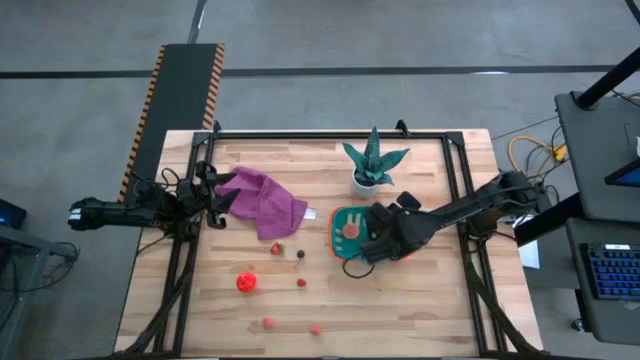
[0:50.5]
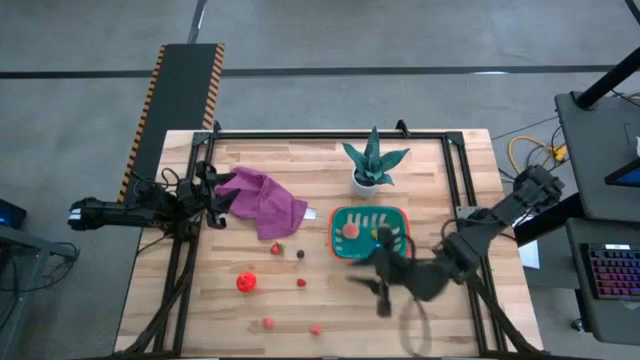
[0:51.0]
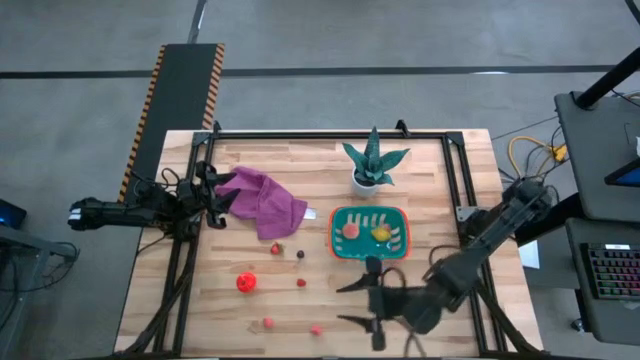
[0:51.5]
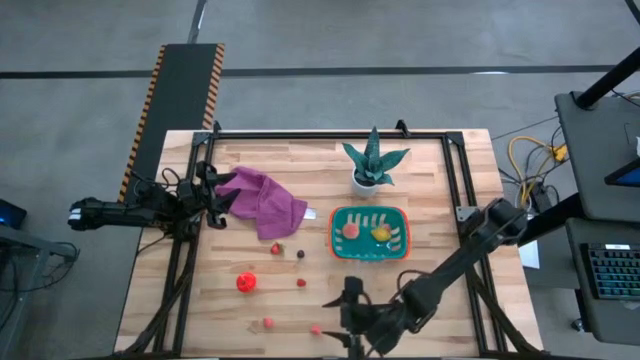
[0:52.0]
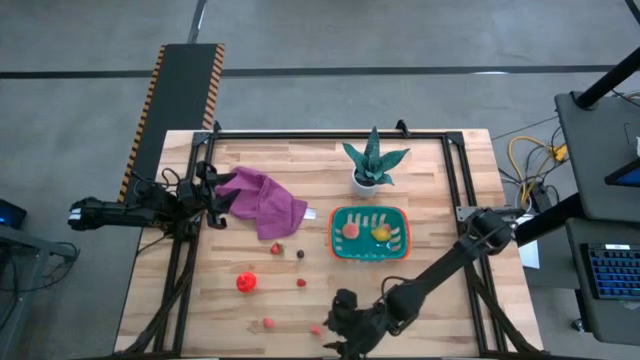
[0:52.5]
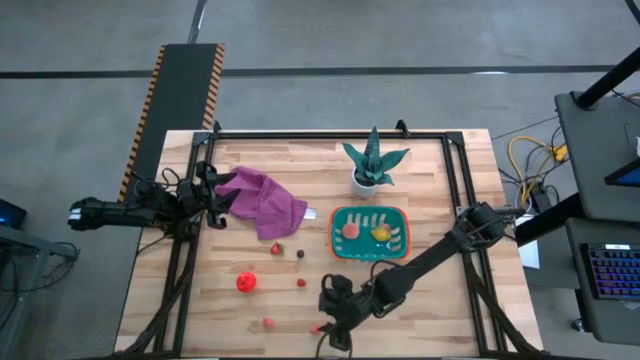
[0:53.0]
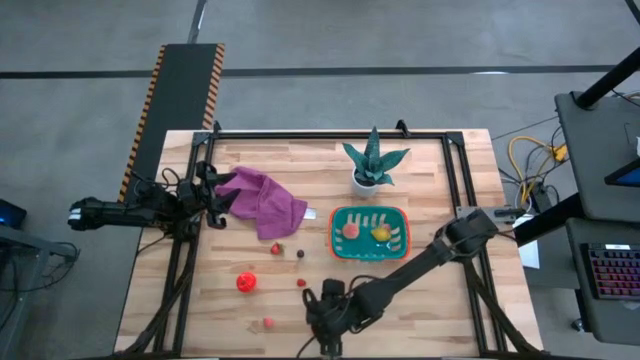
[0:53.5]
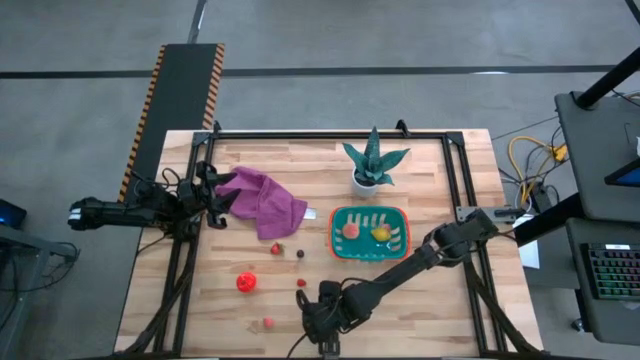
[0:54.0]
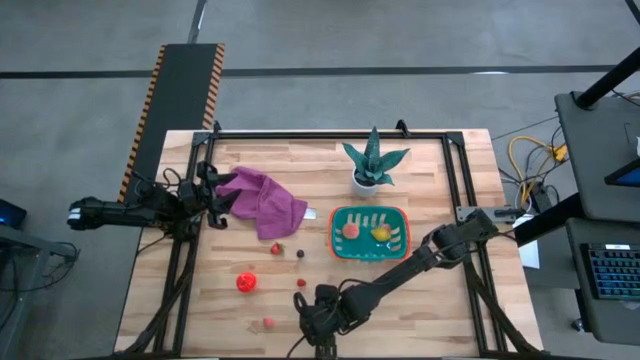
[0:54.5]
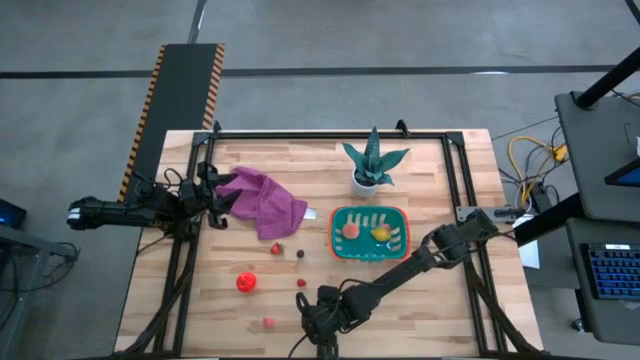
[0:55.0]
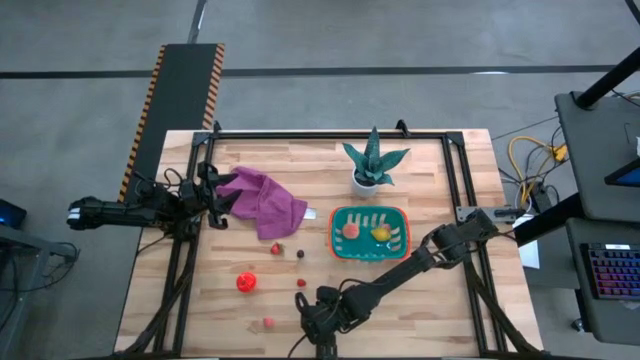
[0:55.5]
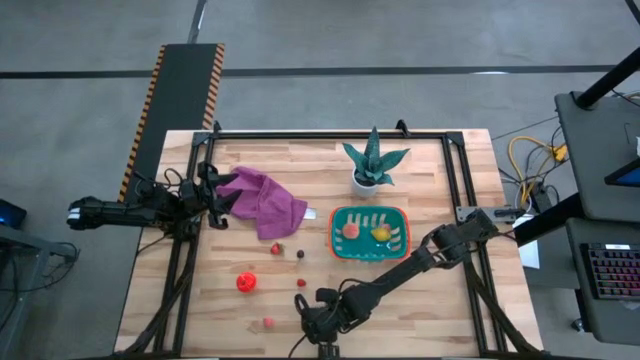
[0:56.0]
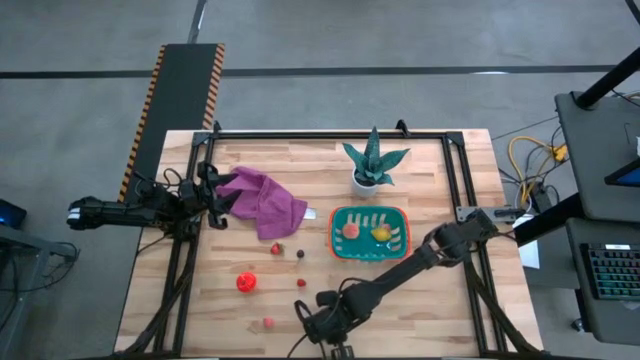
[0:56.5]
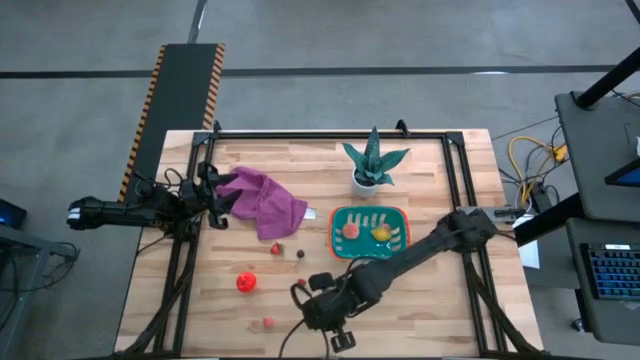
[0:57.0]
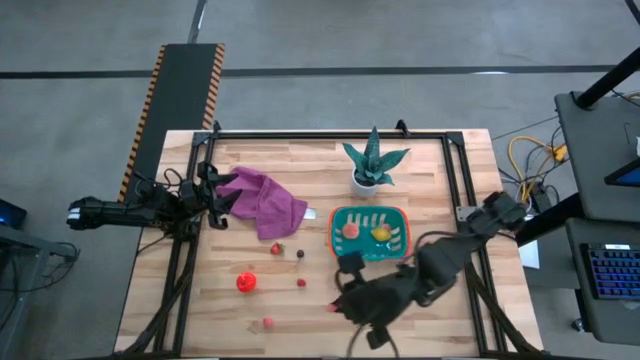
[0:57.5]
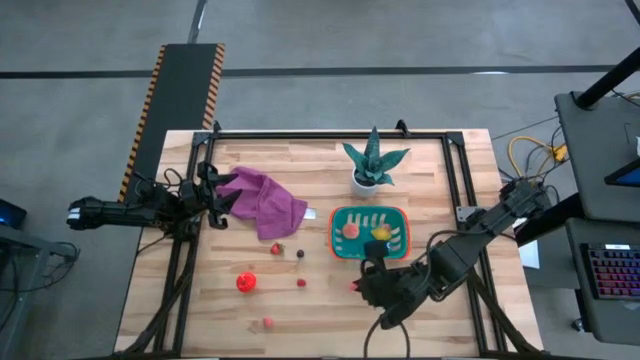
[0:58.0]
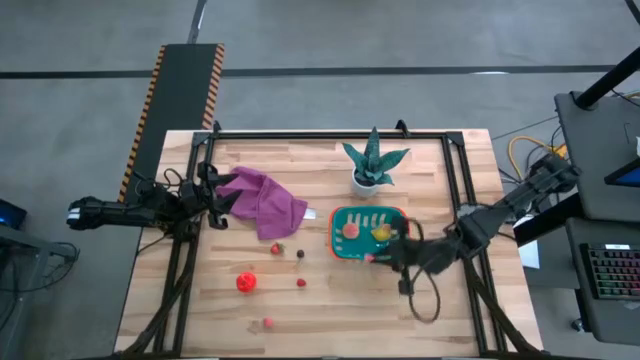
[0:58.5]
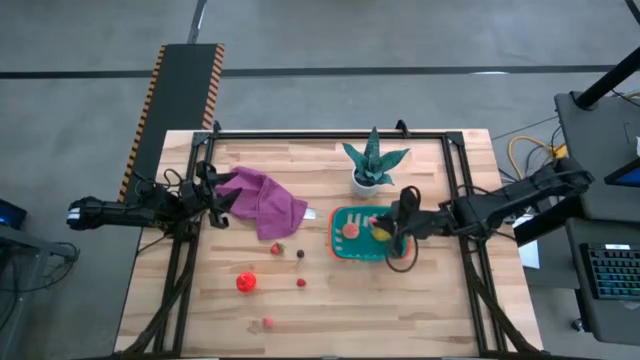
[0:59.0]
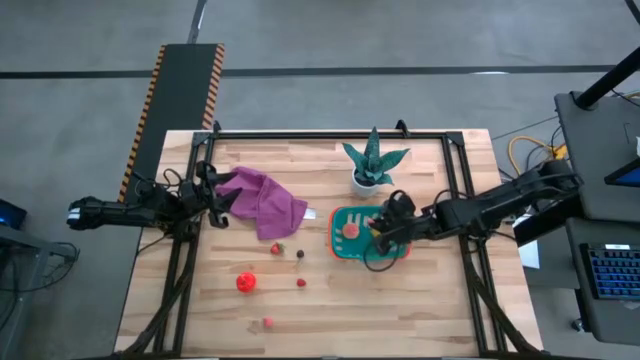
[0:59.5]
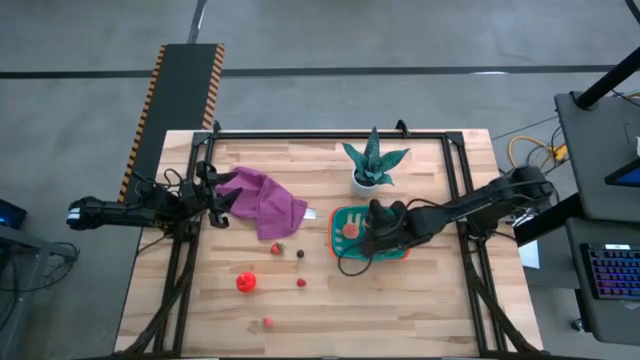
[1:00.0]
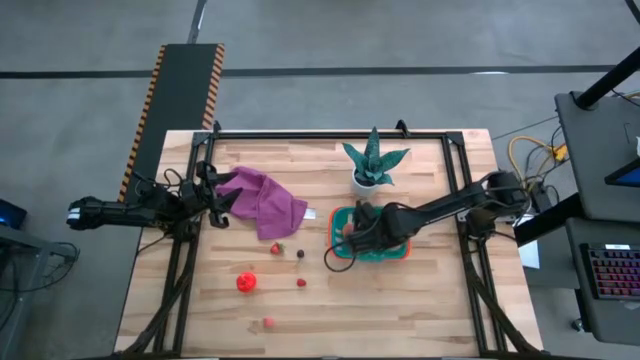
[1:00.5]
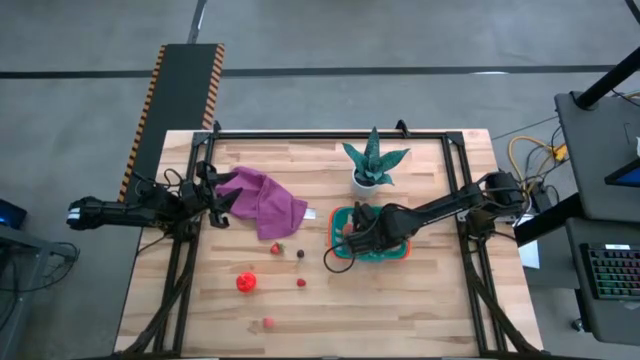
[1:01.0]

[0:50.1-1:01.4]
Task: Pick and placing Produce into tupperware
Put the right apricot into the green basket

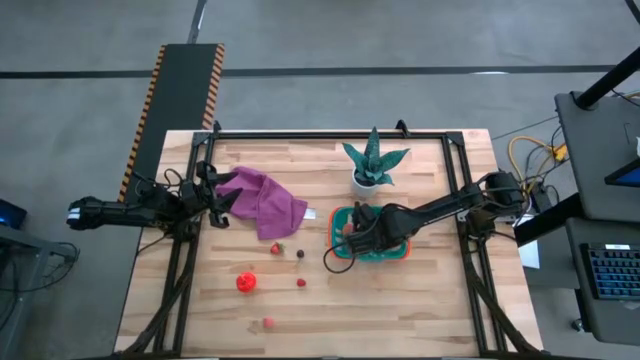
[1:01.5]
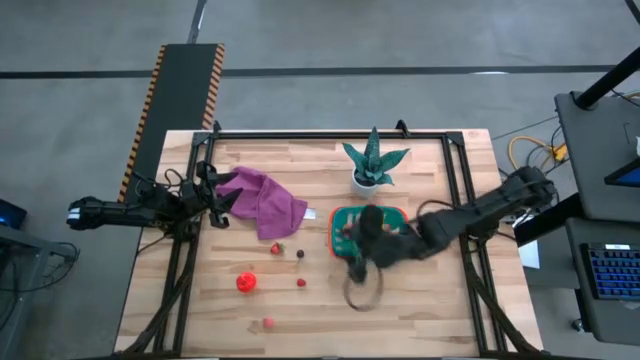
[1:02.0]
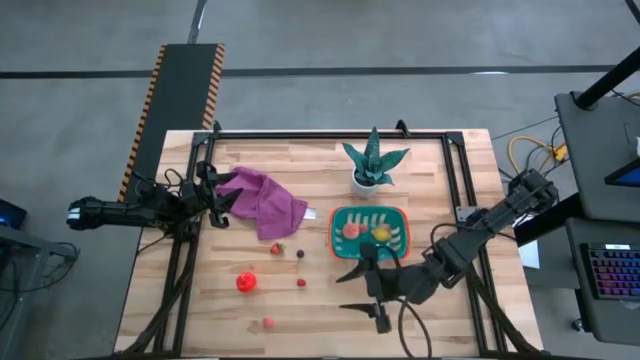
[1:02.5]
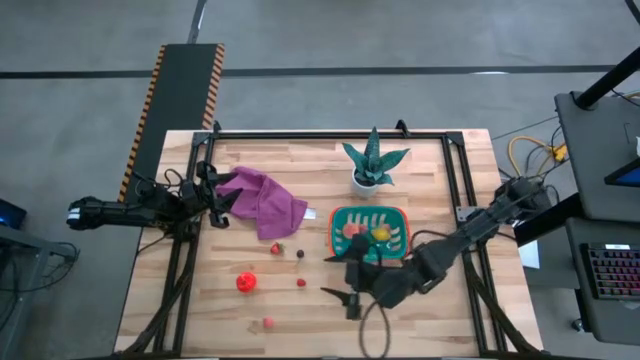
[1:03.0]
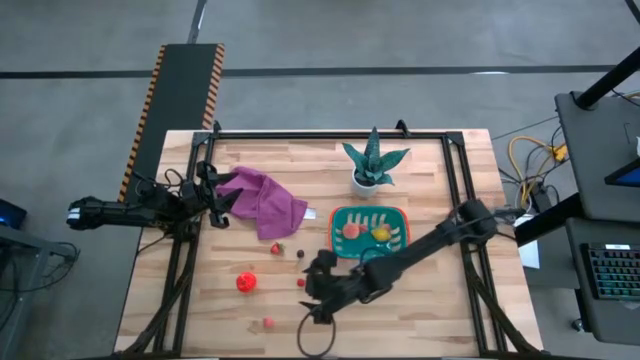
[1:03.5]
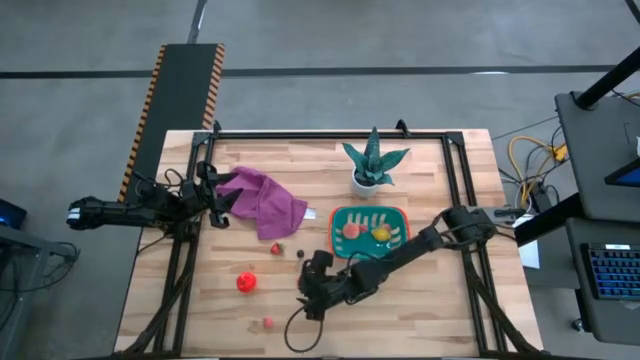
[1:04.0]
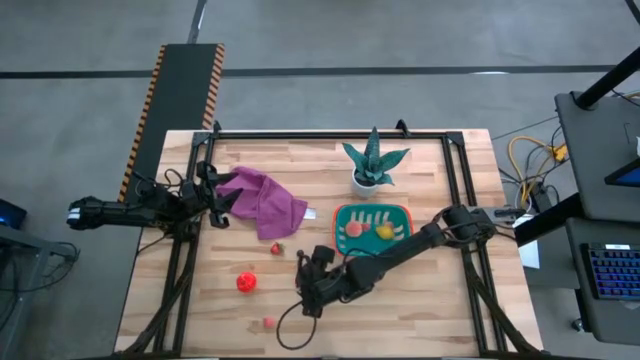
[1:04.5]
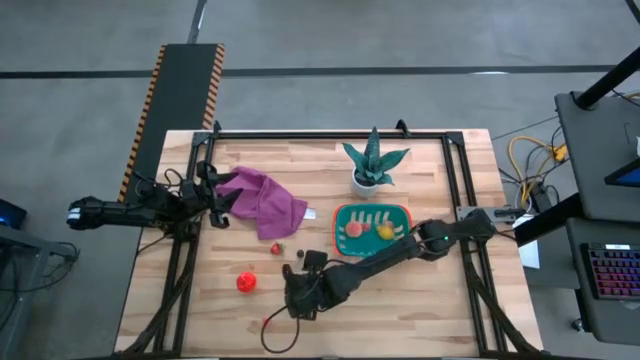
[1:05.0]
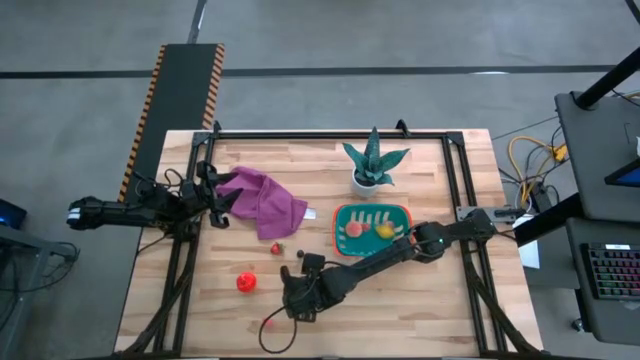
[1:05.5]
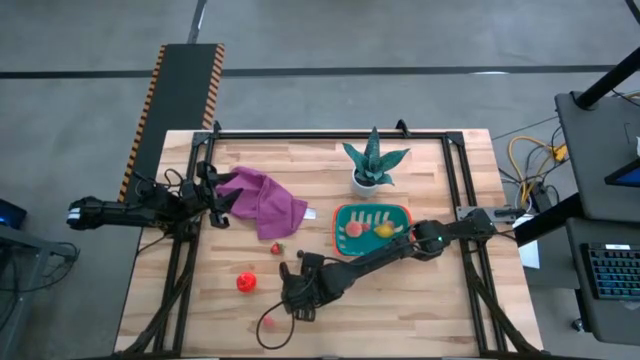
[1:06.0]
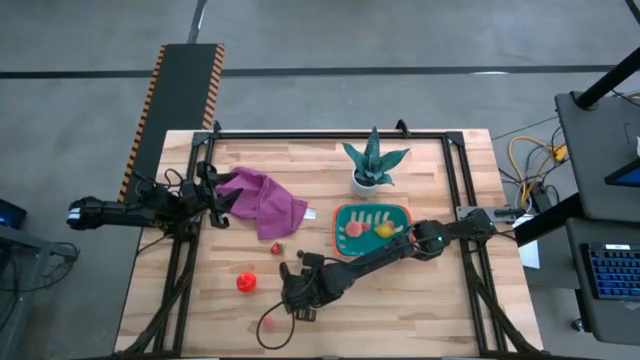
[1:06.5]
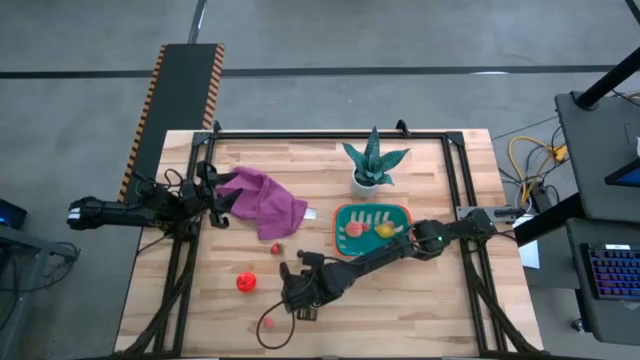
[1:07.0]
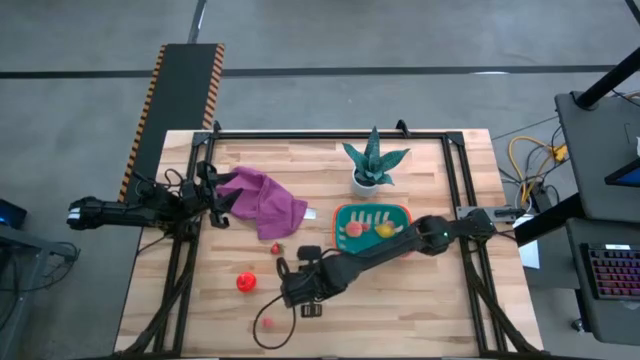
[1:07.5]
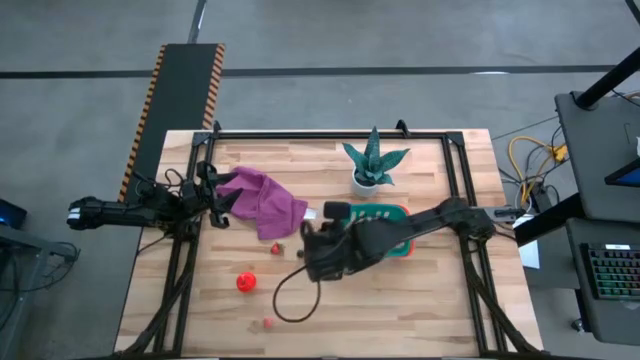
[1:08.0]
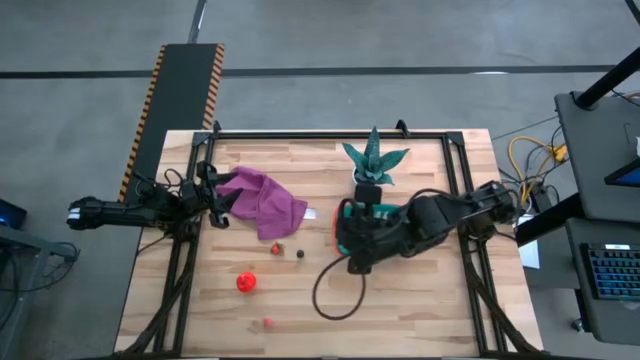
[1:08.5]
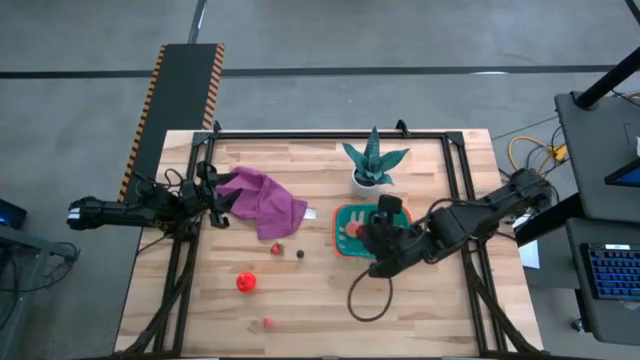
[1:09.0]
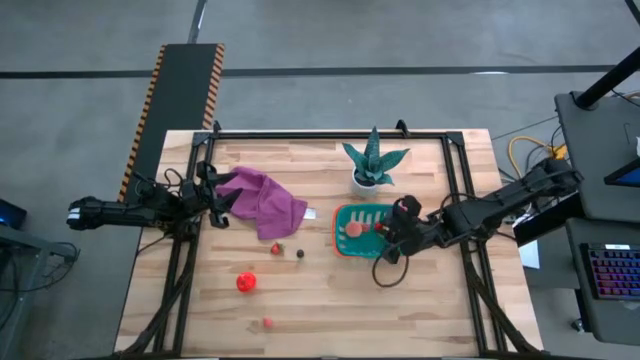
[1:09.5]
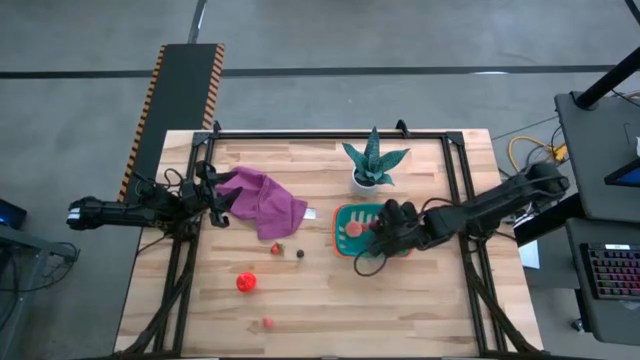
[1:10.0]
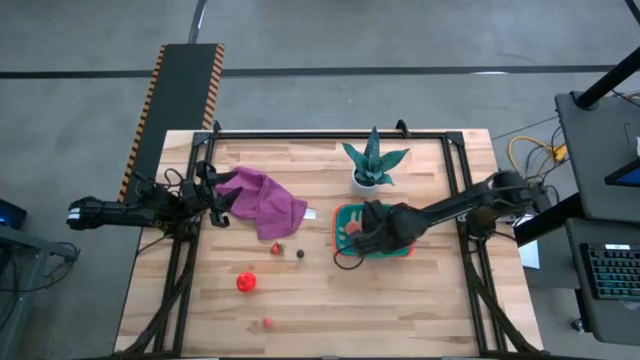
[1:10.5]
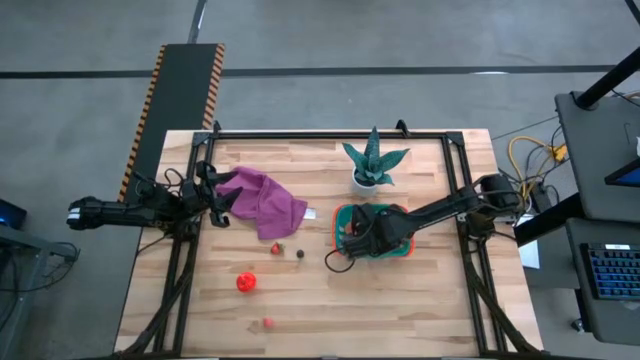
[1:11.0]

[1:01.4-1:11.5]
Put the raspberry into the green basket
